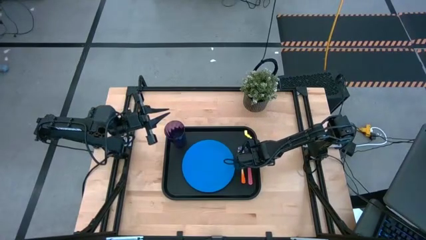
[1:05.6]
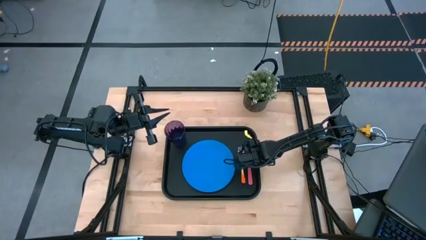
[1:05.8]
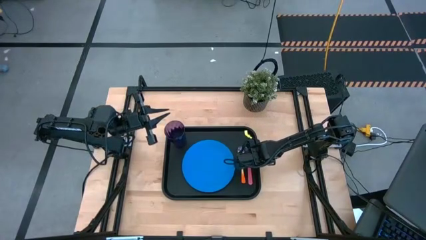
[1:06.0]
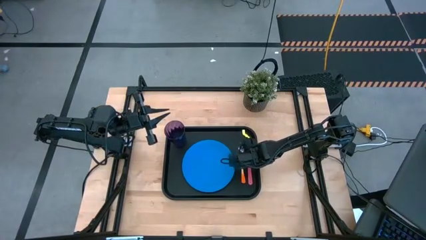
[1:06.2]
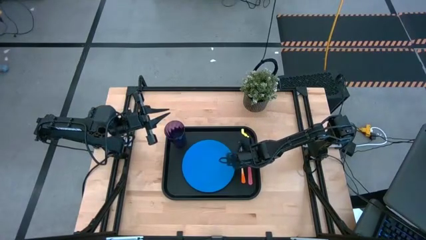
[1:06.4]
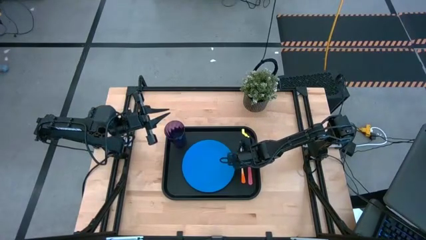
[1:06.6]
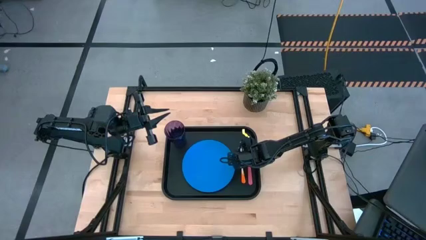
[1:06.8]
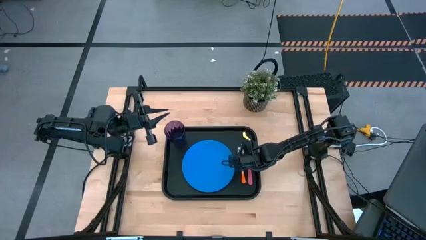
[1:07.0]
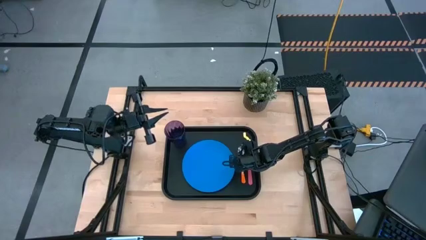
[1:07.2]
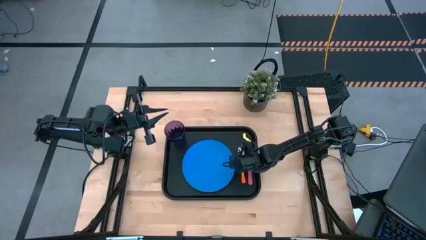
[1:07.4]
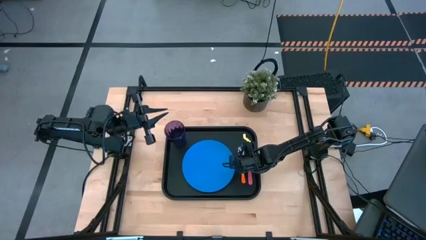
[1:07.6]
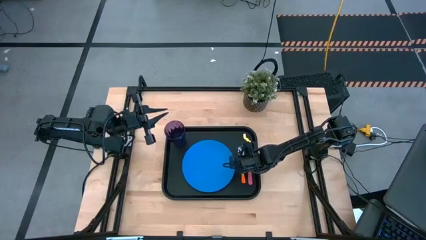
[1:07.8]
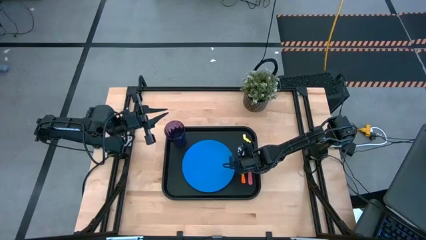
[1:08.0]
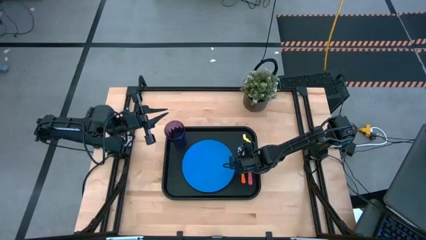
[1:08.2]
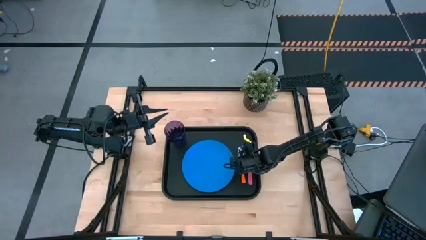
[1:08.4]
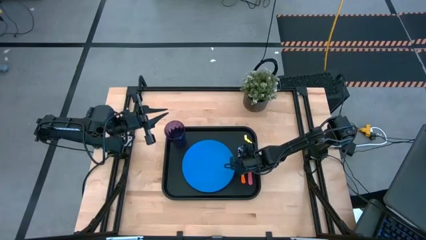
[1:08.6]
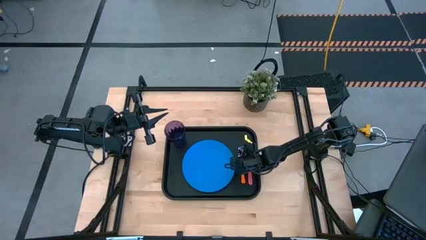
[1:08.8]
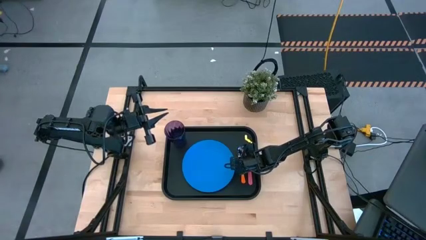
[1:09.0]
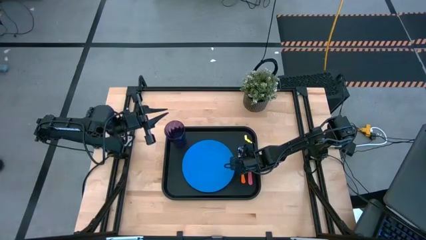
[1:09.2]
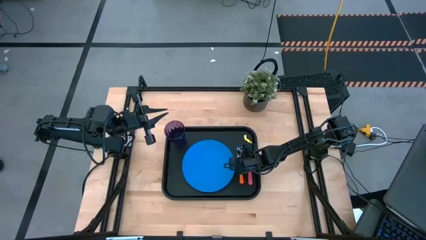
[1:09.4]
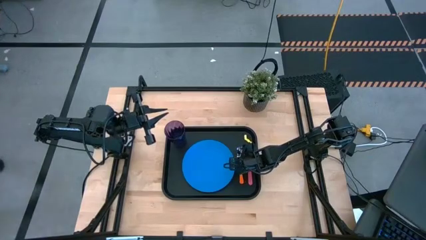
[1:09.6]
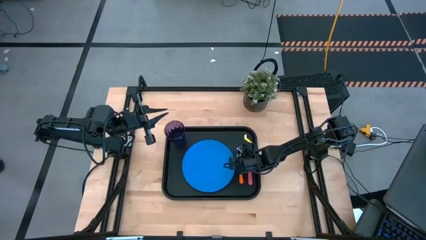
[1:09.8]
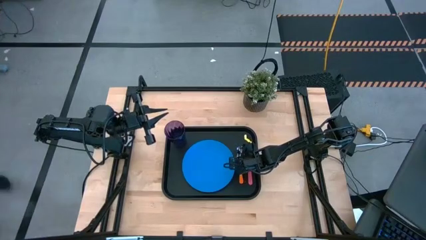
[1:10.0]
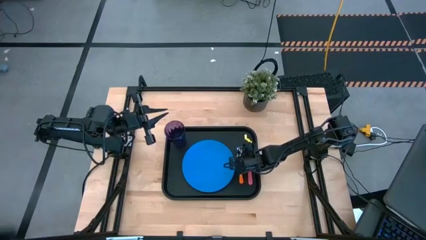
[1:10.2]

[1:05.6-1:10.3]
Task: Pick and place plate/cup/fork/spoon on tray
Adjust the orange spoon on the black serving tray

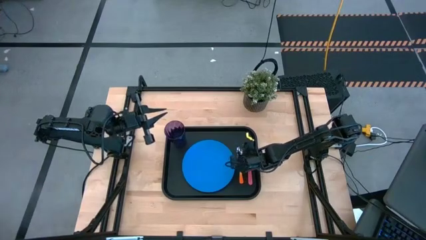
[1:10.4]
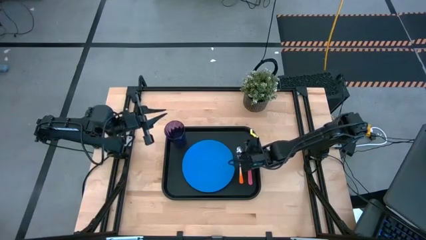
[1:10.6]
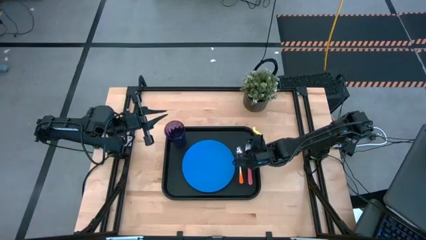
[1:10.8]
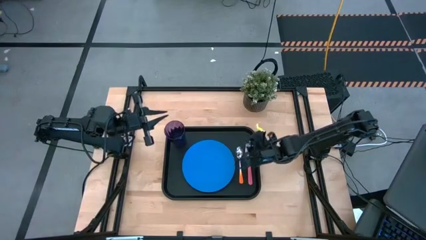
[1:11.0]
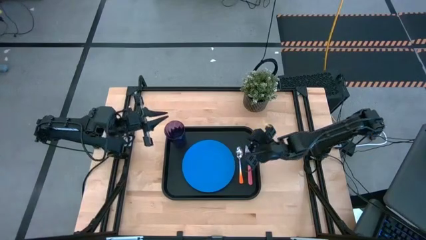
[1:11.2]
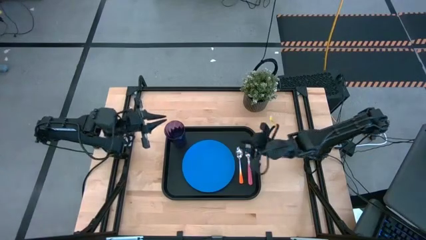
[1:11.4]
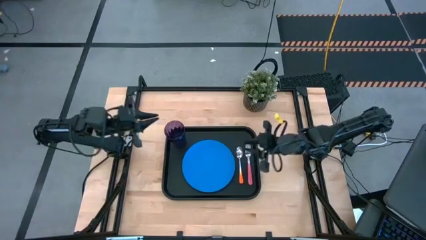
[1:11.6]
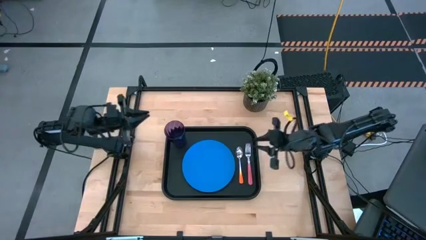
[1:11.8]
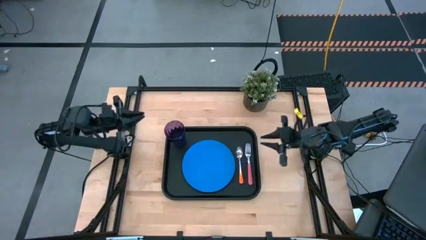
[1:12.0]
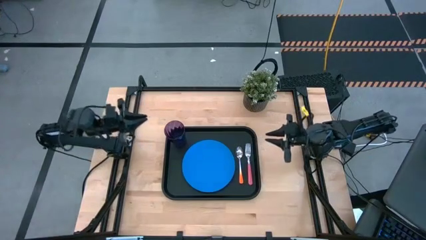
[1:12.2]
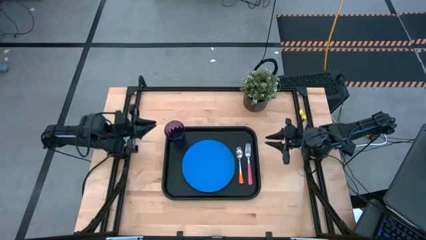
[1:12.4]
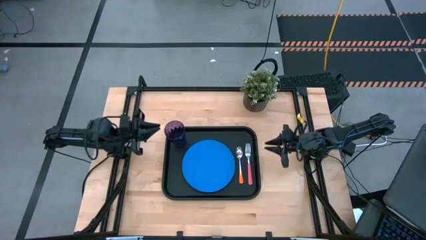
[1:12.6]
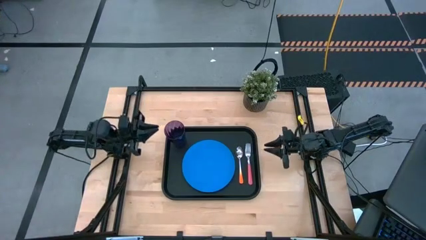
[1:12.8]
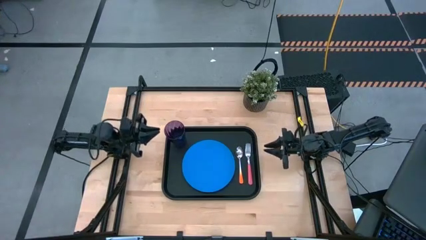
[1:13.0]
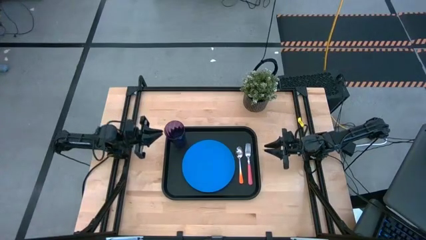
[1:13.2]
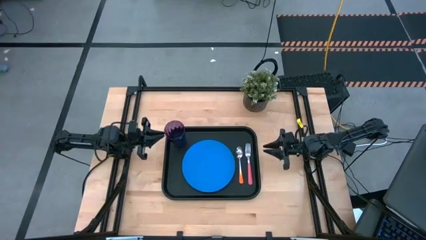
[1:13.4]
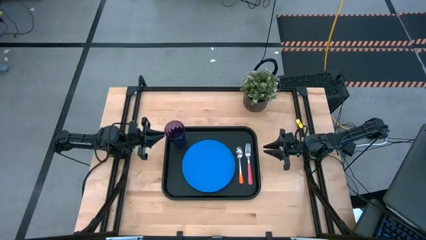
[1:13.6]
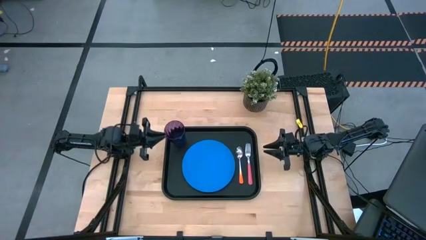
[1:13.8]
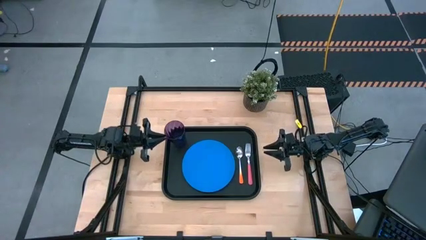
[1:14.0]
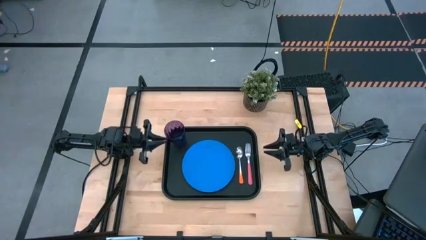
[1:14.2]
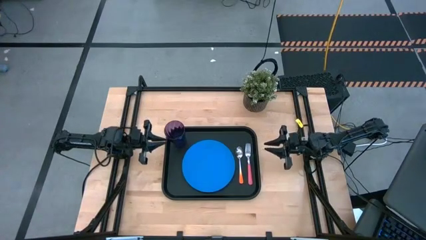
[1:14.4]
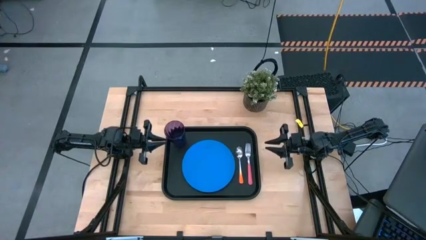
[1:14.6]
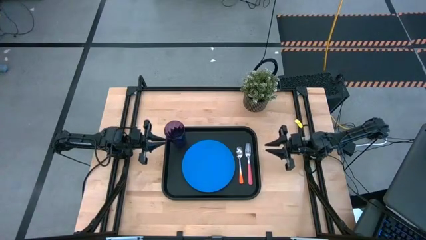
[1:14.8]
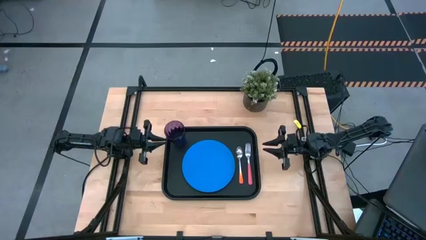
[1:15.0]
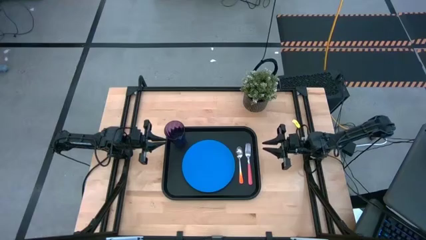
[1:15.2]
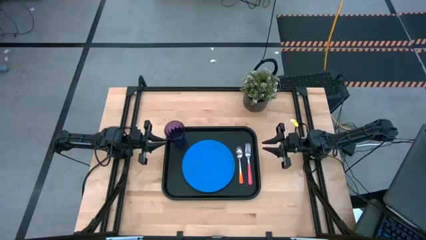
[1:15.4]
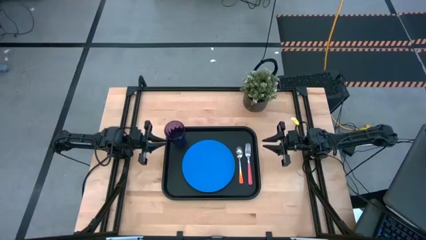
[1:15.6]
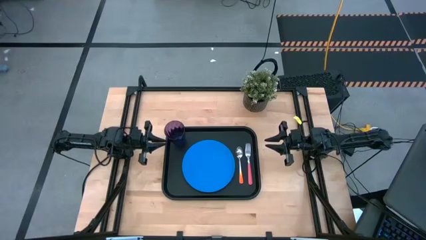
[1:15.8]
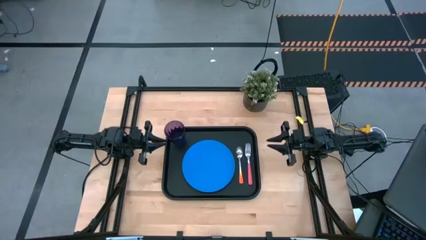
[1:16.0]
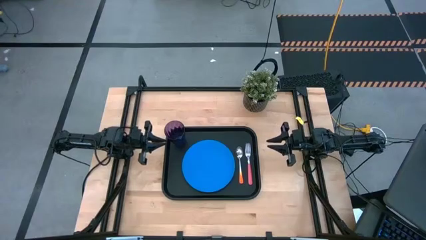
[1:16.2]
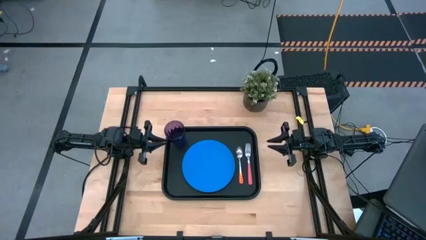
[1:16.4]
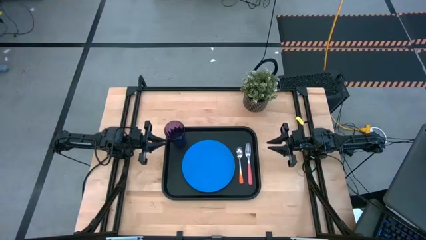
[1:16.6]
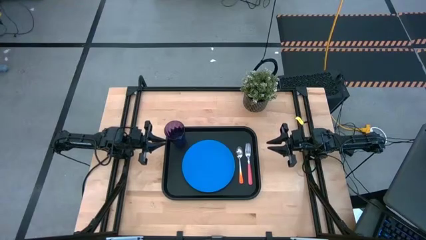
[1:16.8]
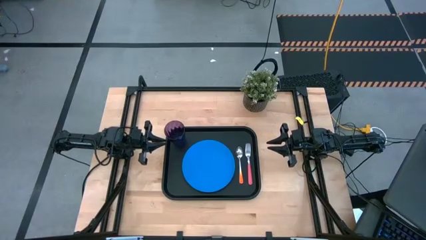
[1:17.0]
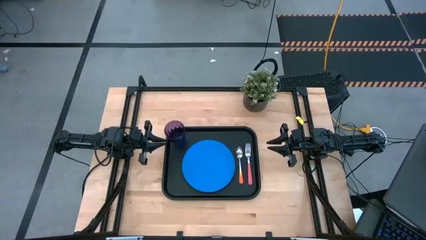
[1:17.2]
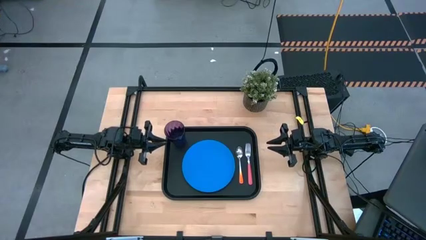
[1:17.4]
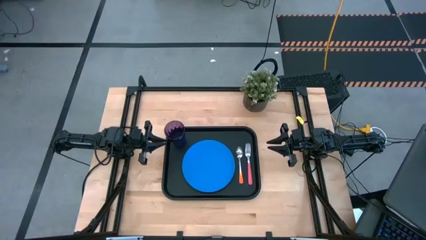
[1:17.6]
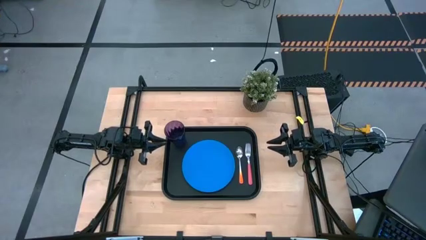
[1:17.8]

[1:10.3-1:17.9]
Return to Home Position

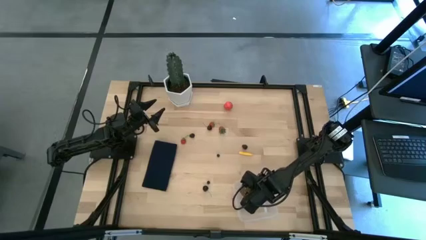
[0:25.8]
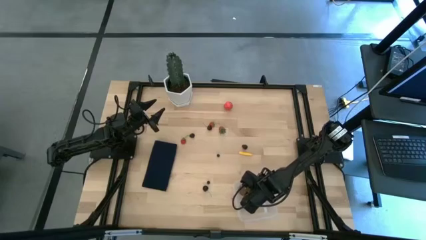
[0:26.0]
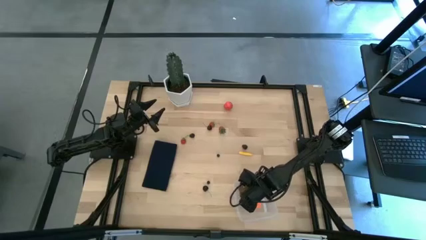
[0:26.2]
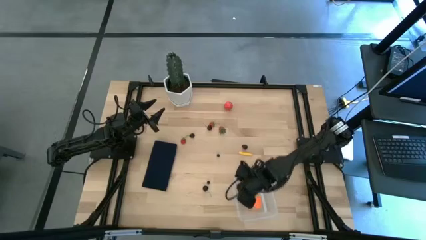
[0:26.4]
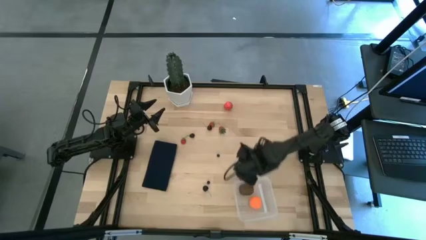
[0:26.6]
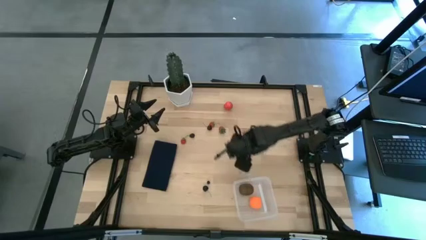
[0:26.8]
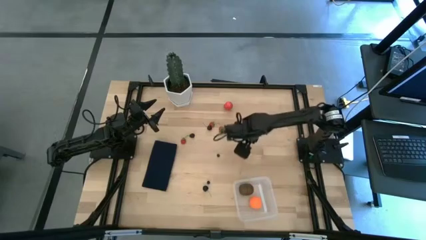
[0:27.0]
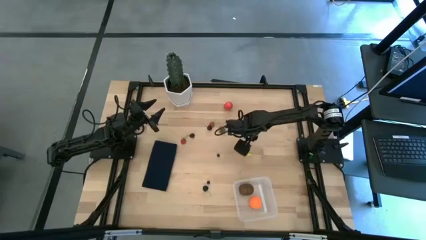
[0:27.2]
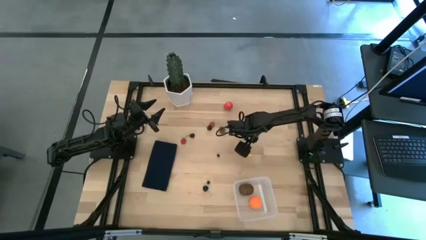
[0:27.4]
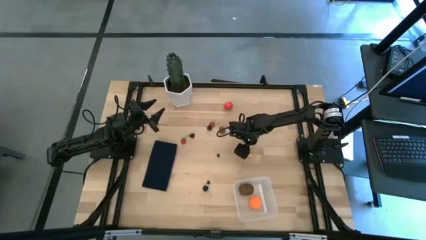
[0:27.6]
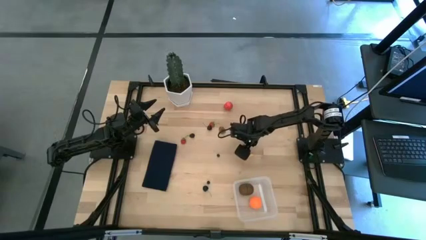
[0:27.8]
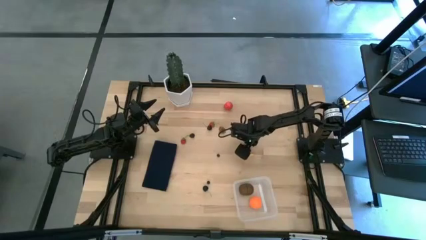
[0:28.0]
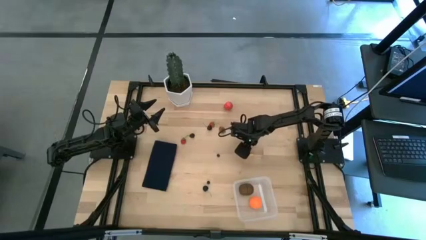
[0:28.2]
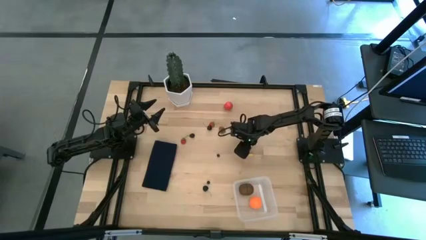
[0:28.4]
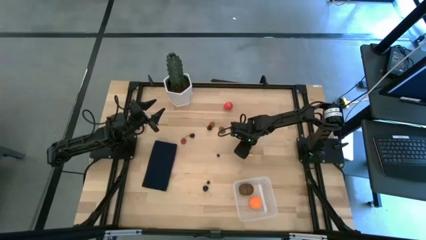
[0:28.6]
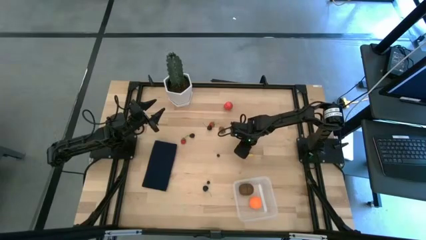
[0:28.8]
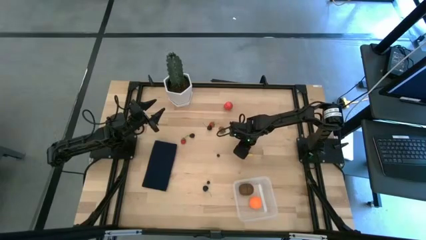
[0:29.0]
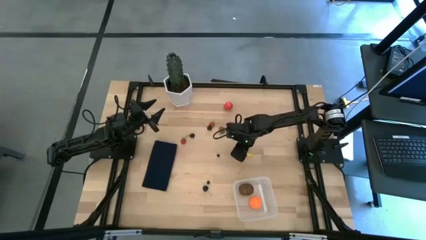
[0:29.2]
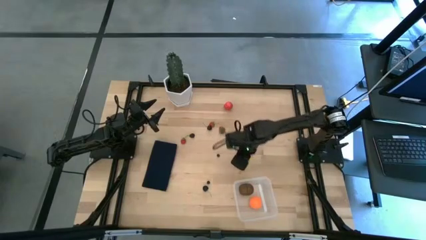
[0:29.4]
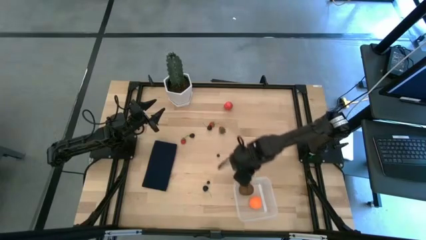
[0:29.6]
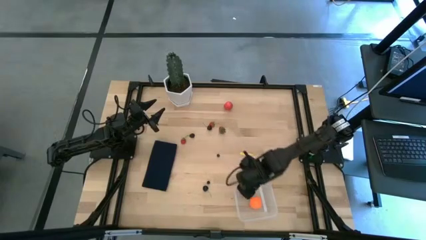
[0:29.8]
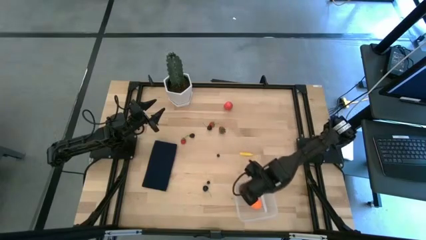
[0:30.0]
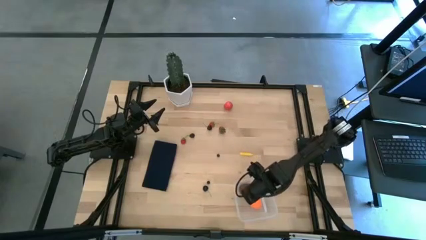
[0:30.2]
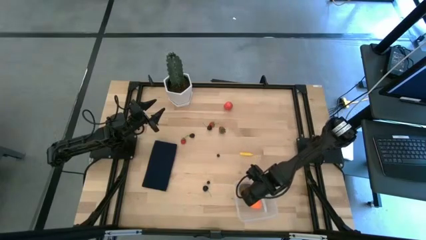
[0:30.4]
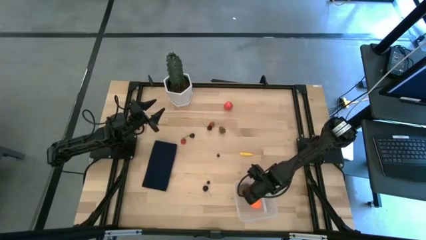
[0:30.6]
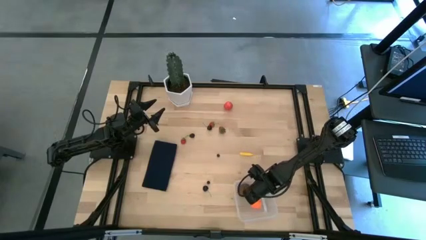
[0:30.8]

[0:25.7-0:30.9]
Task: Pick and placing Produce into tupperware
Put the right blackberry into the transparent bin
